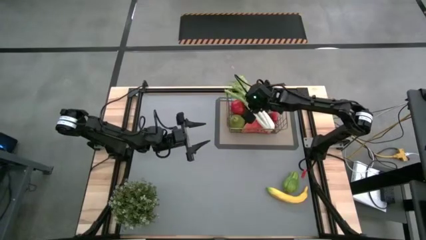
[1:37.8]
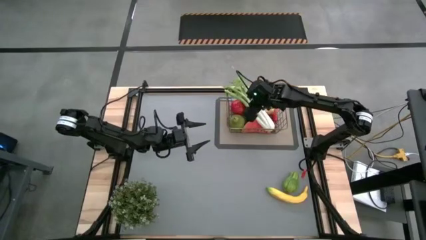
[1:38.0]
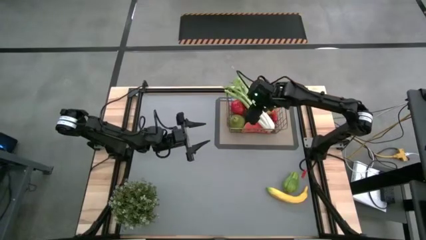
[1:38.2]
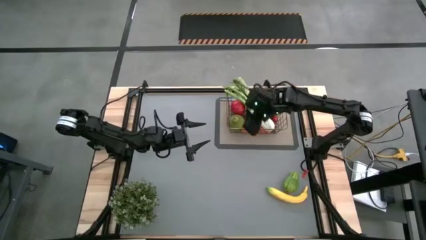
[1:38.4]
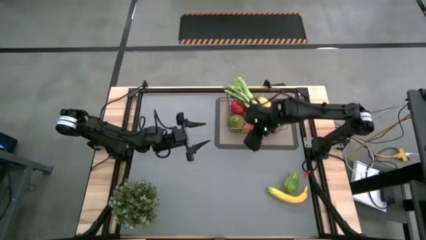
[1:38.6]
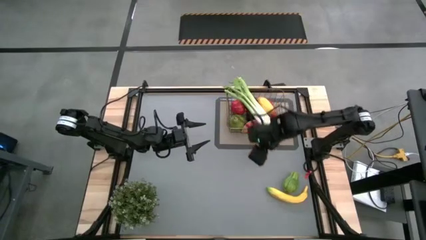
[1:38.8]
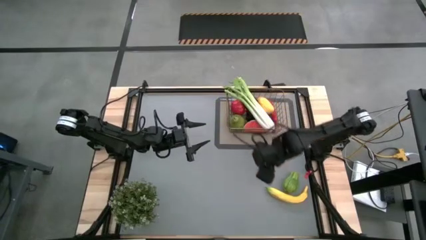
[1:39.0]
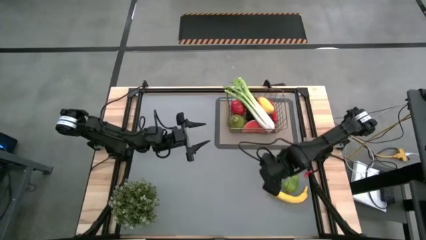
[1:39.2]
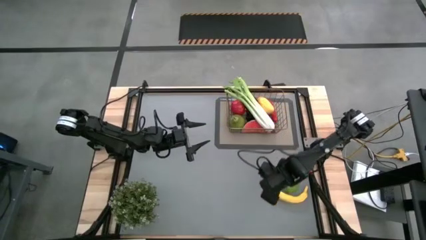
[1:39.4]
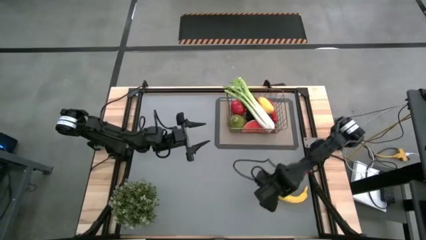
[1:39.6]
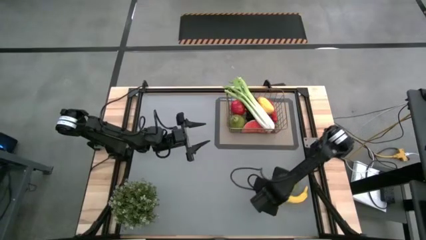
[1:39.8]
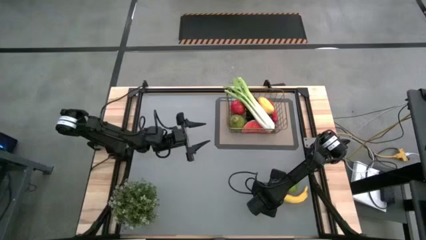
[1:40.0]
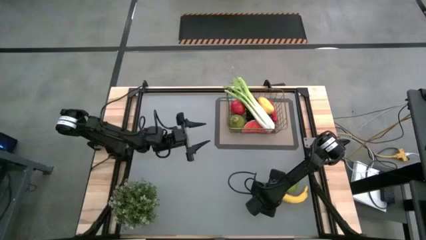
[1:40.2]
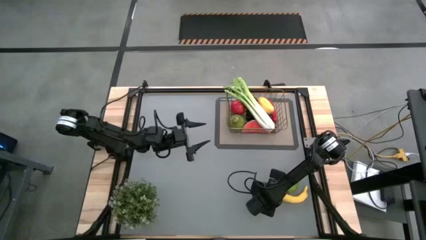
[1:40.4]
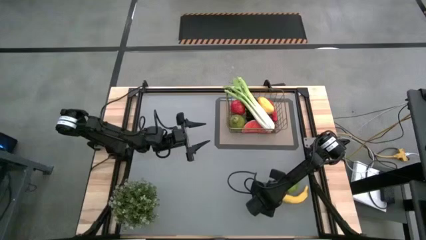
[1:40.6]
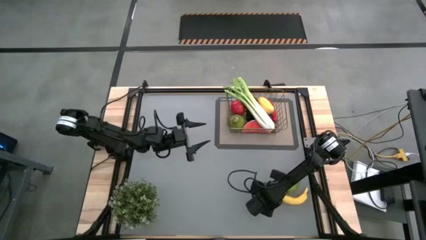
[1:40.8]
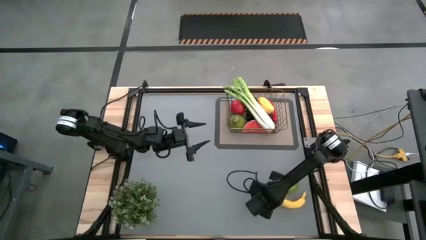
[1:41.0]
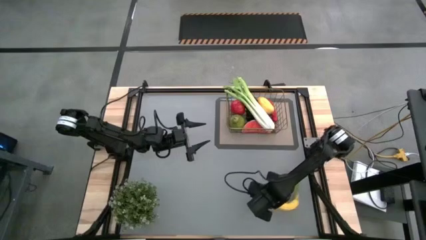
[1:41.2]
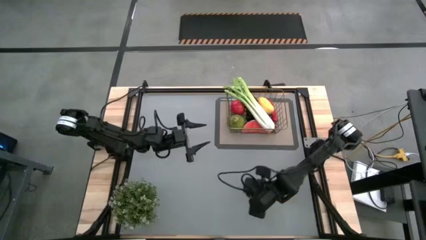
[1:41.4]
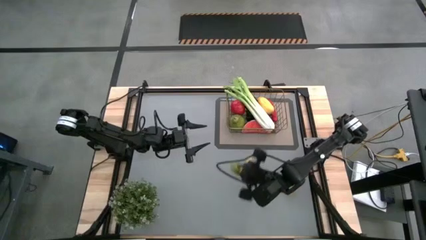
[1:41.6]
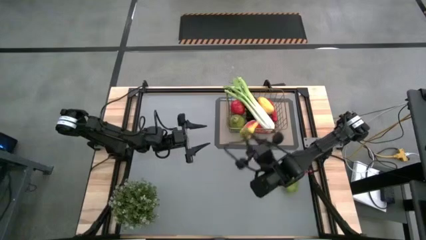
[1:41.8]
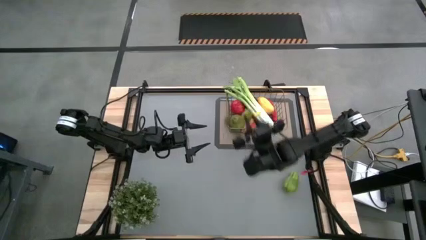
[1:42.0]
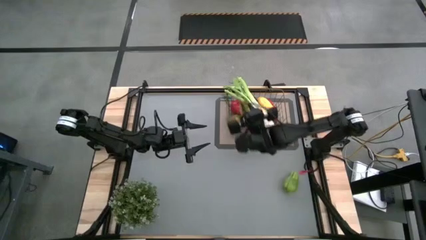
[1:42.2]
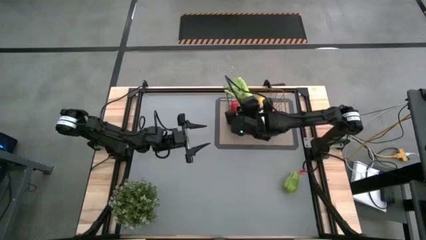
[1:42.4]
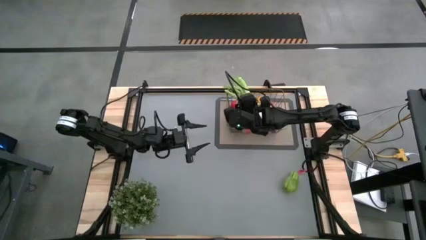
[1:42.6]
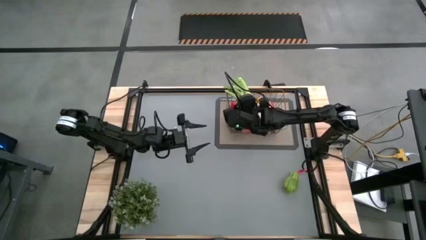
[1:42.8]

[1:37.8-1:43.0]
Task: Build produce basket
Put the banana into the wire basket

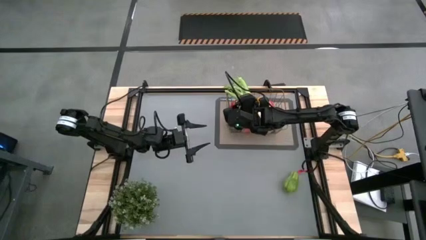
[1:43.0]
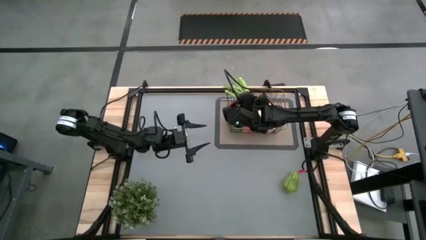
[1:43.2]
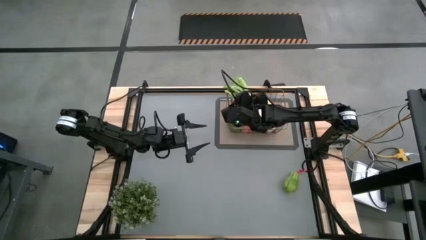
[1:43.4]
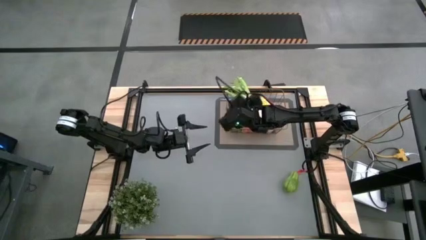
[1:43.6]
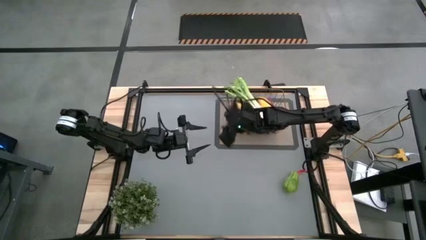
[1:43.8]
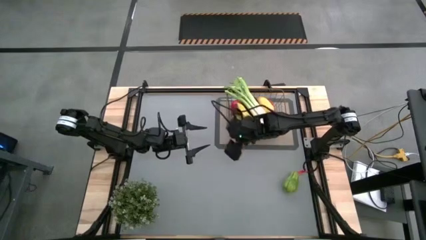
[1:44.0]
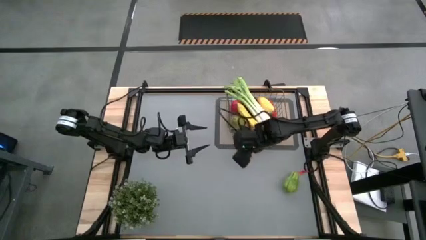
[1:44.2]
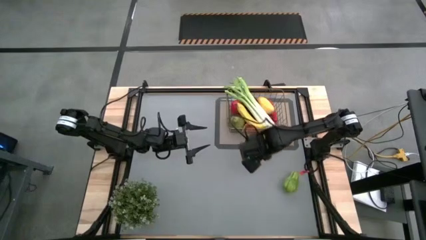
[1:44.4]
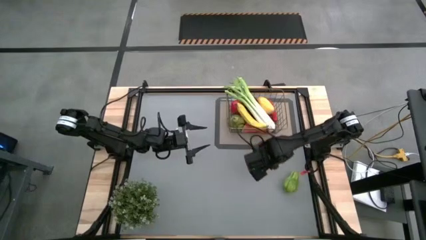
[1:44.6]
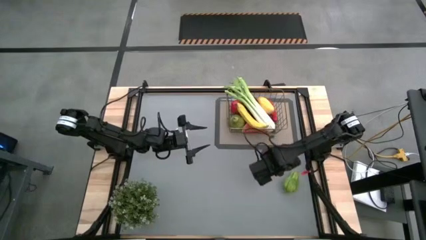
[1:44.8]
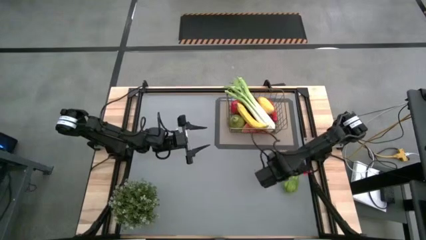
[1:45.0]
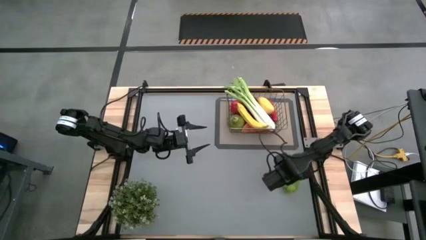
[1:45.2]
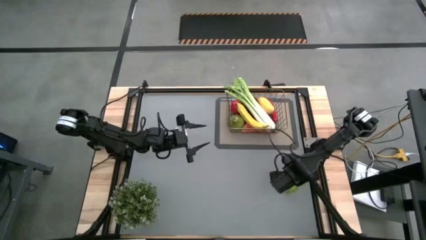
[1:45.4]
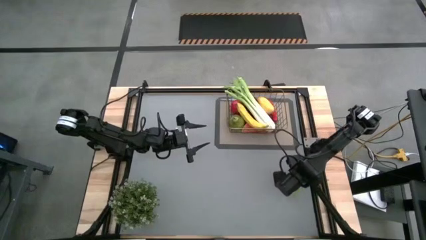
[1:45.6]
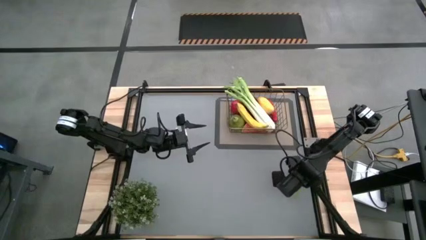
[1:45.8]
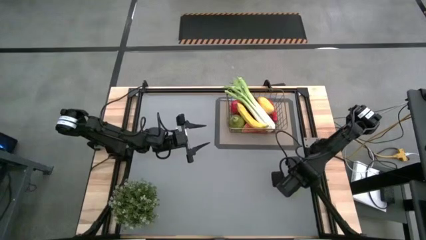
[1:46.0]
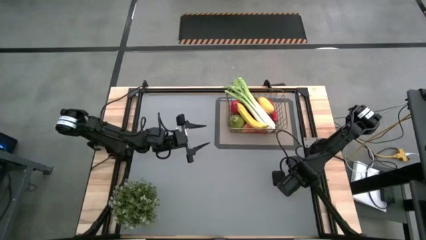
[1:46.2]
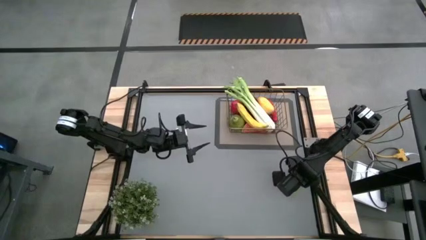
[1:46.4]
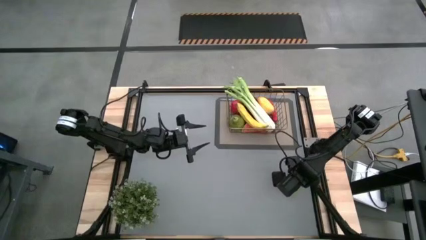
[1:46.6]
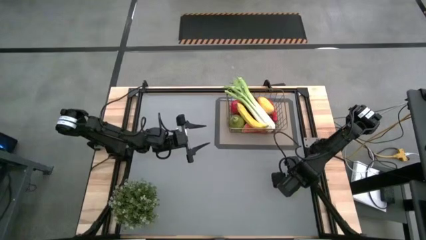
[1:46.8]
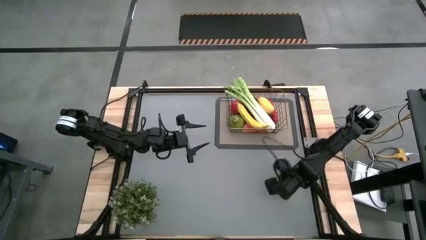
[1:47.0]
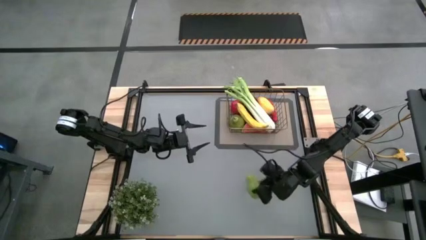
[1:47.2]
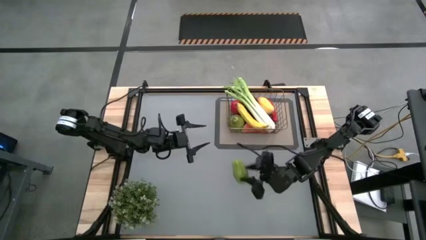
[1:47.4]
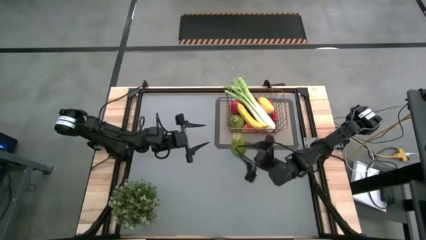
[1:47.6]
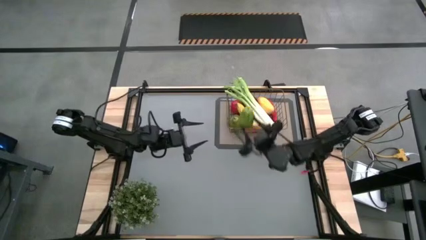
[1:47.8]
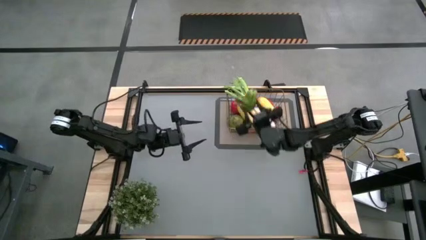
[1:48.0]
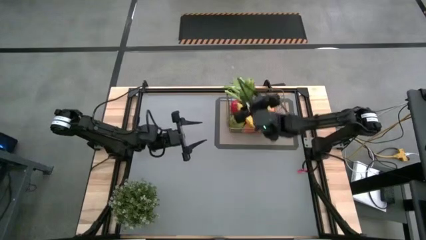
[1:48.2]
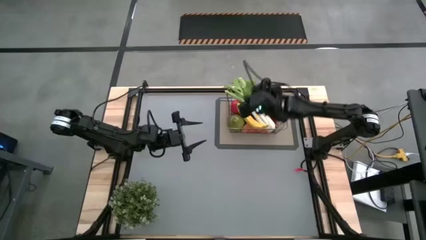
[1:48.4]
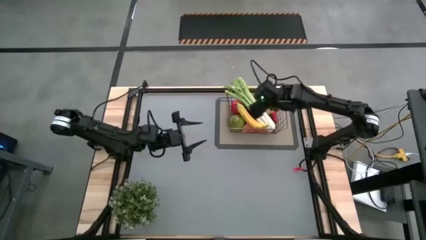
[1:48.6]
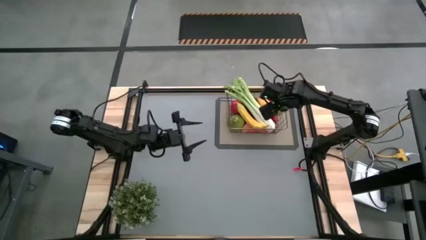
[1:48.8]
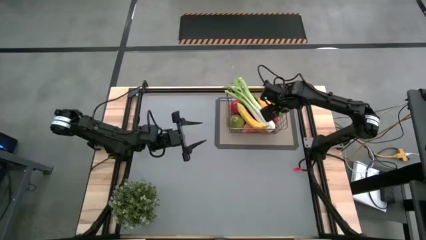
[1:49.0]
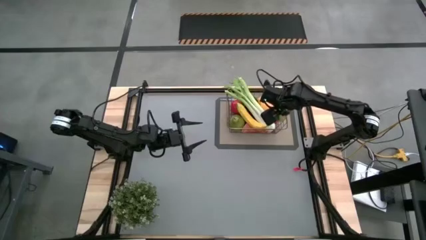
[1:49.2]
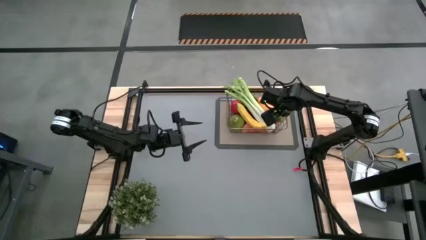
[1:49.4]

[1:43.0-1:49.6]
Put the chayote into the wire basket

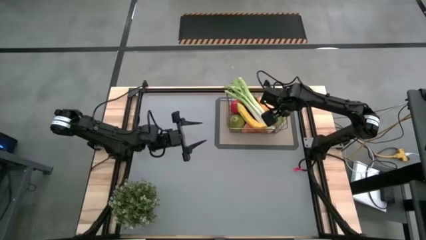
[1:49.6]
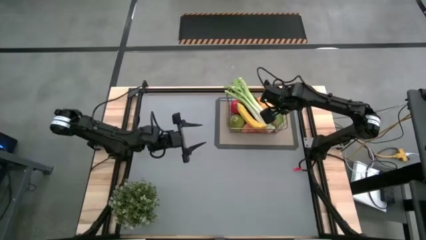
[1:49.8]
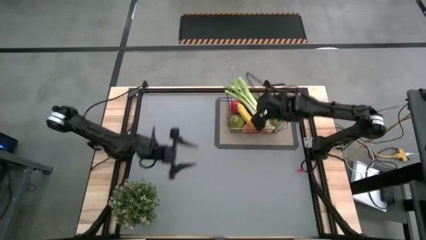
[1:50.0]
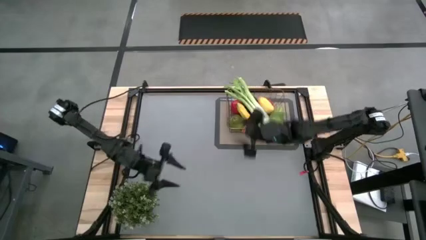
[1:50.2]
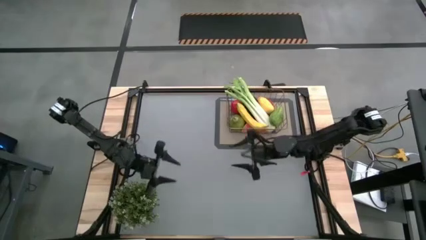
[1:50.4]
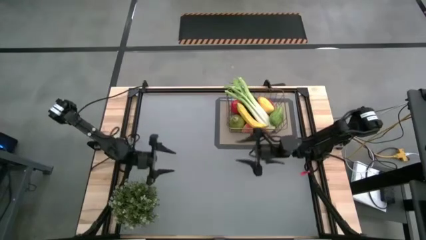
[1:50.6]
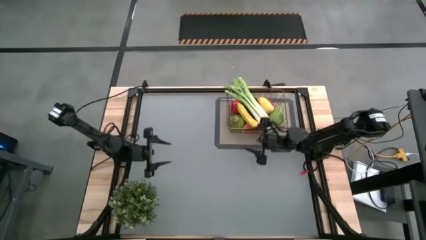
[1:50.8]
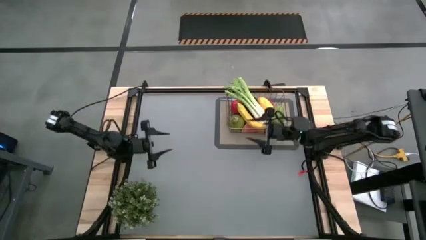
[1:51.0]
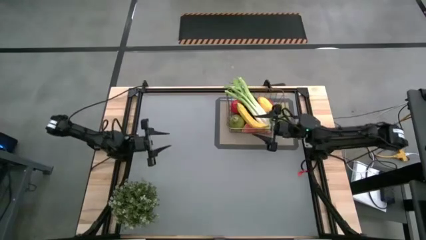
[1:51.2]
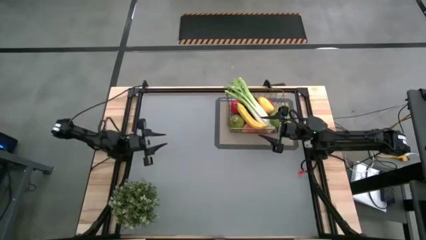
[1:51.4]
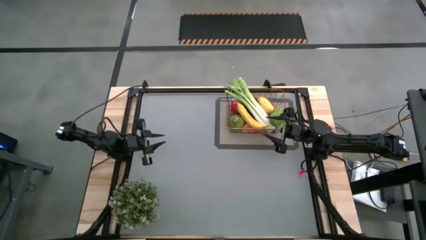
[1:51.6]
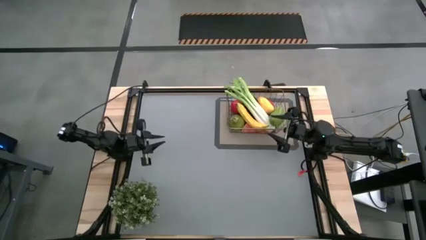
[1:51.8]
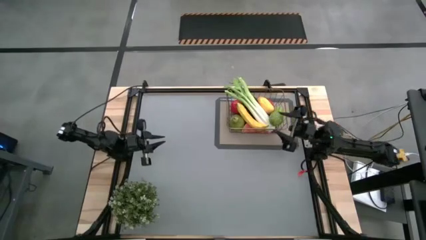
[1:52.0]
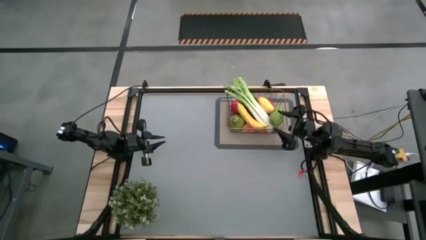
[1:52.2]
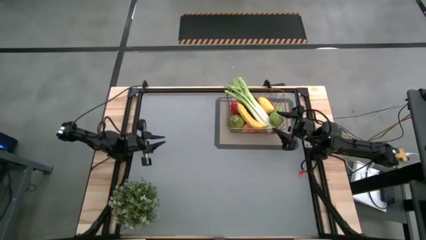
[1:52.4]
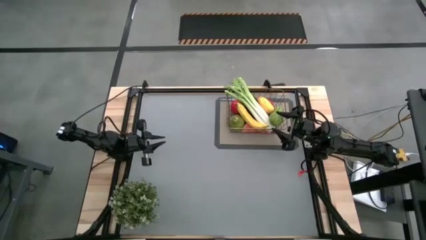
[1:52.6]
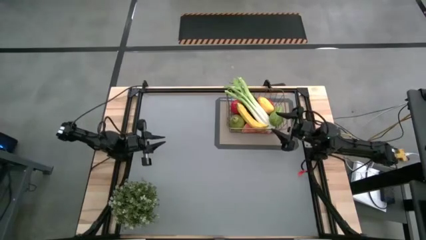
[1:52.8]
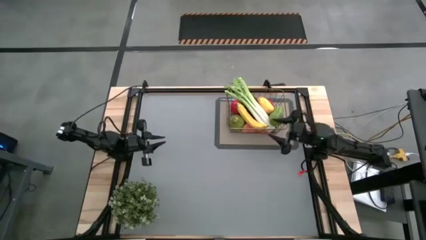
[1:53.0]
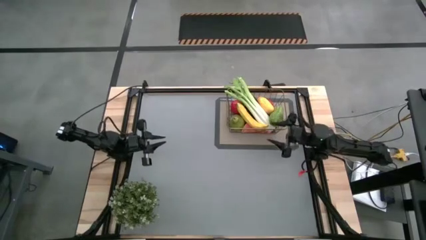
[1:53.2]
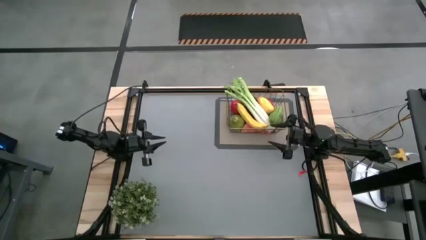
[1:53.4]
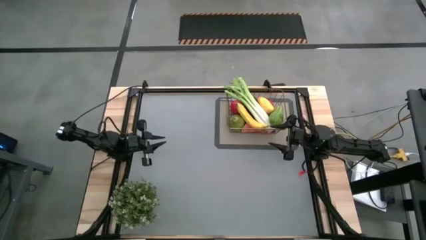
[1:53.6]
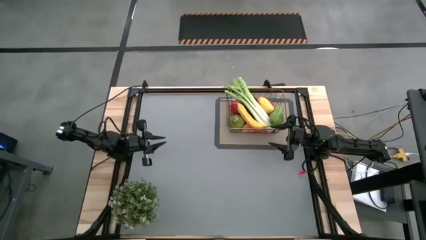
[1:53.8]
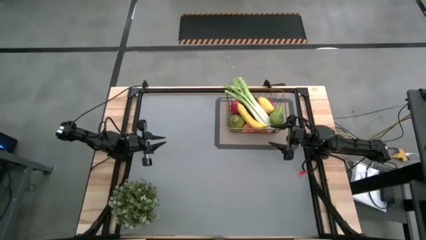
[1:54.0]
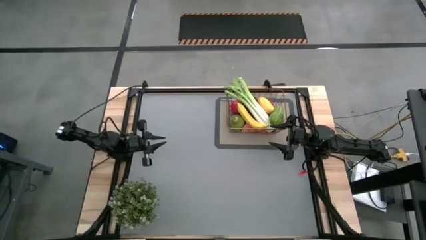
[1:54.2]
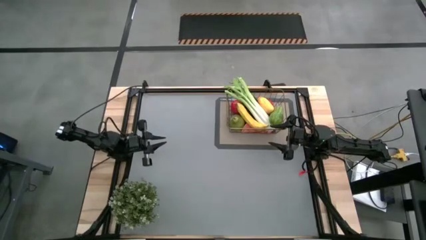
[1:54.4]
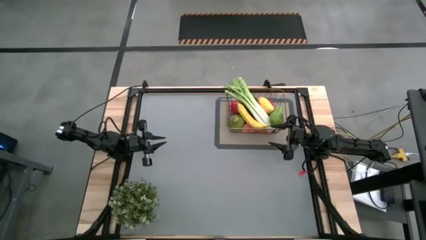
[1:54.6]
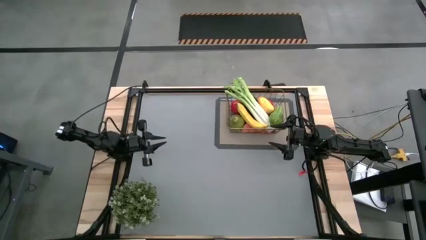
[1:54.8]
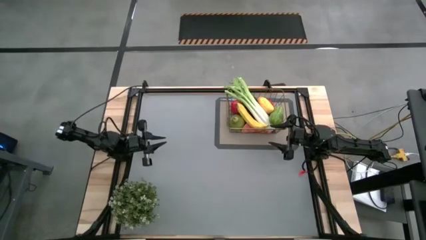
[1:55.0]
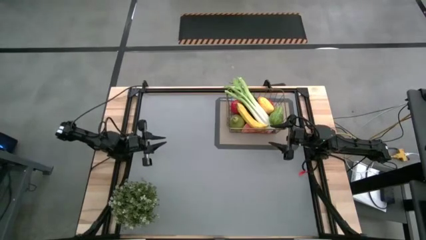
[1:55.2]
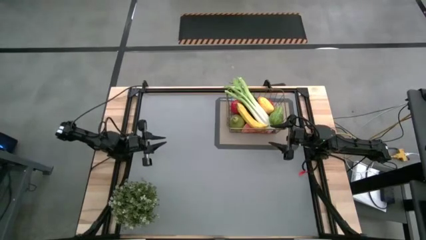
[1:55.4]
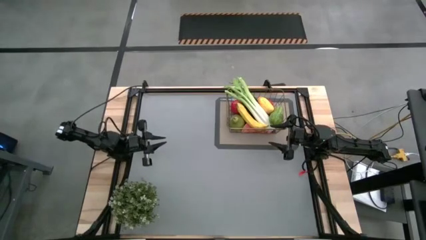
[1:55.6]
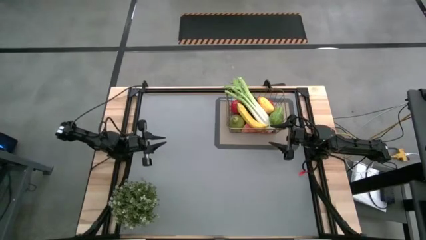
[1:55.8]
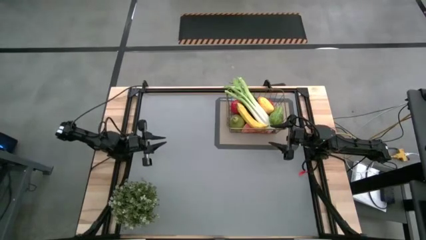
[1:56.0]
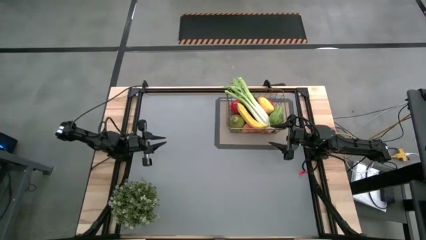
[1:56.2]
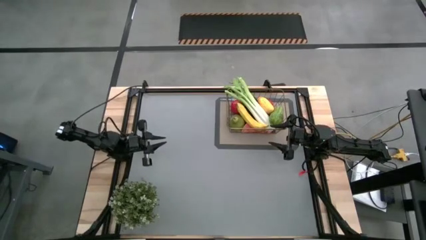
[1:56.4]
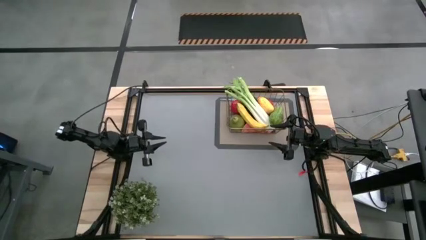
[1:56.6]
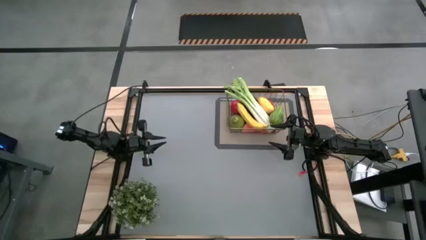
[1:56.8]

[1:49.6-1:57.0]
Return to Home Position
